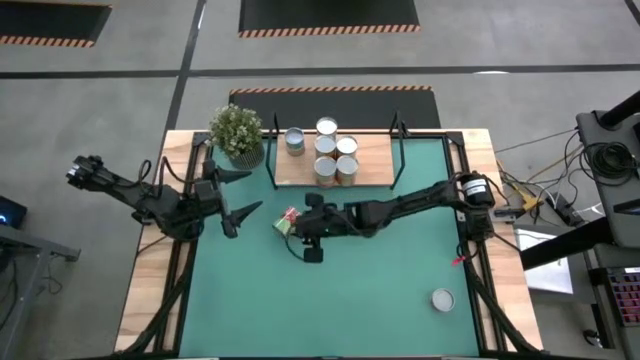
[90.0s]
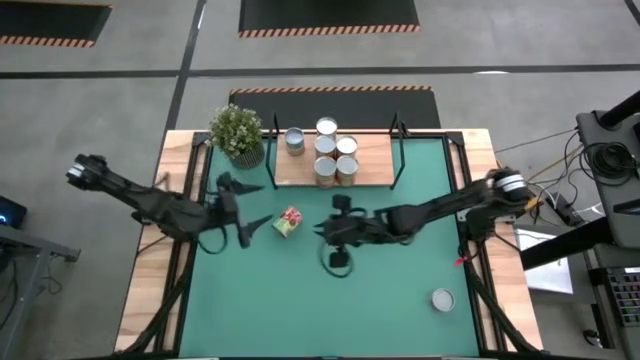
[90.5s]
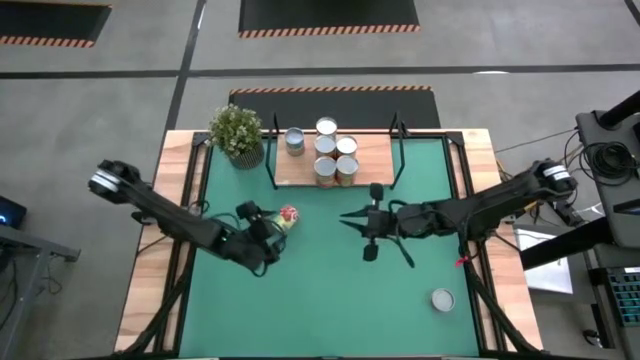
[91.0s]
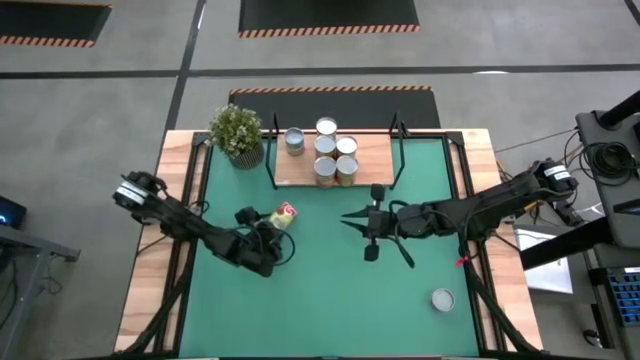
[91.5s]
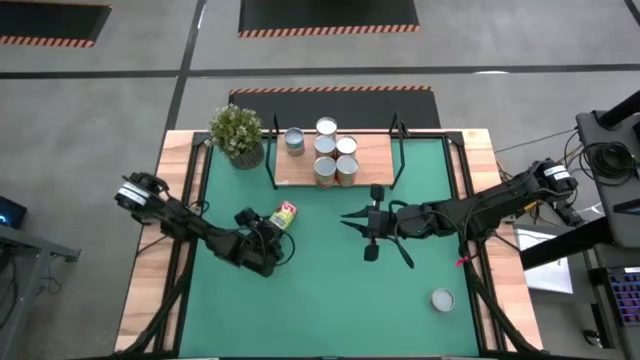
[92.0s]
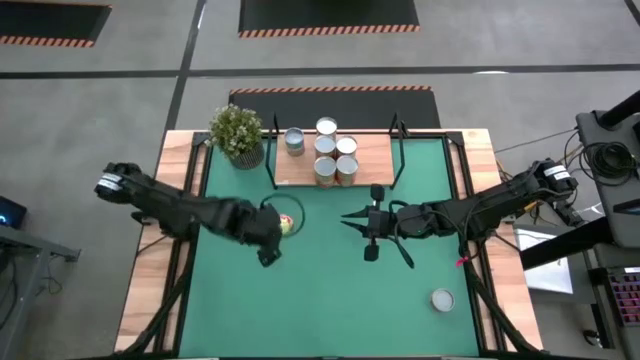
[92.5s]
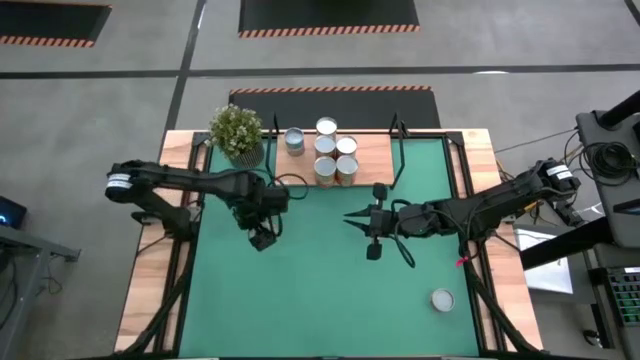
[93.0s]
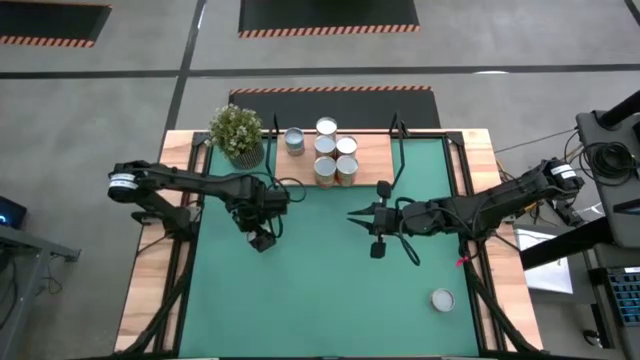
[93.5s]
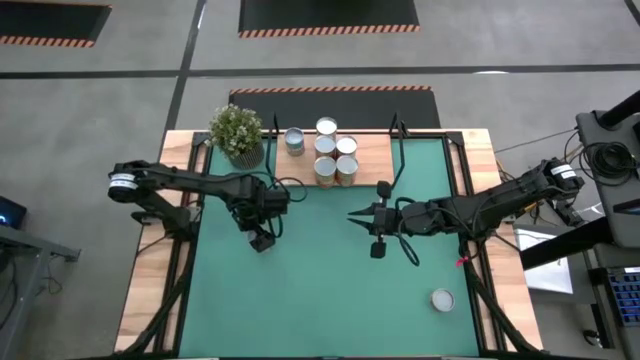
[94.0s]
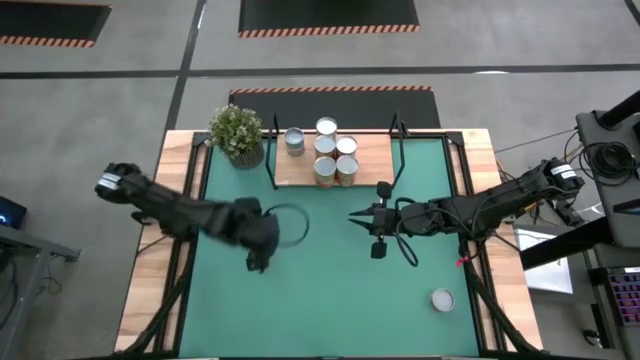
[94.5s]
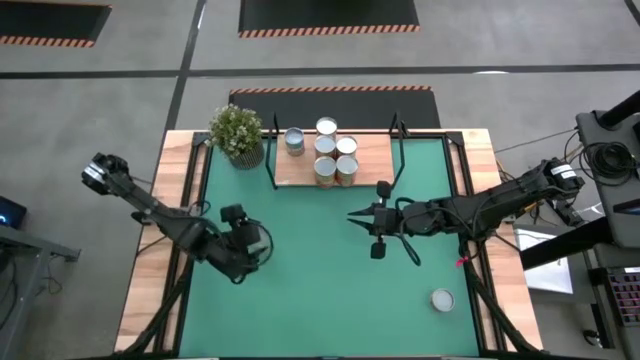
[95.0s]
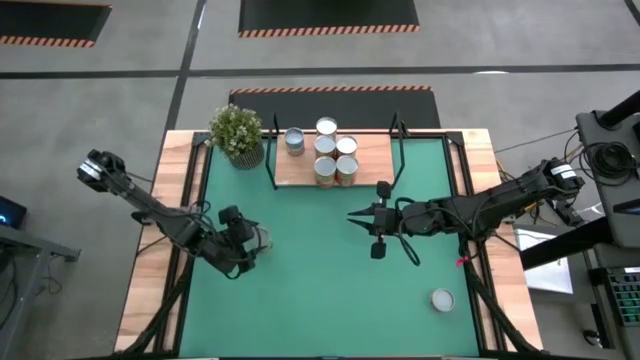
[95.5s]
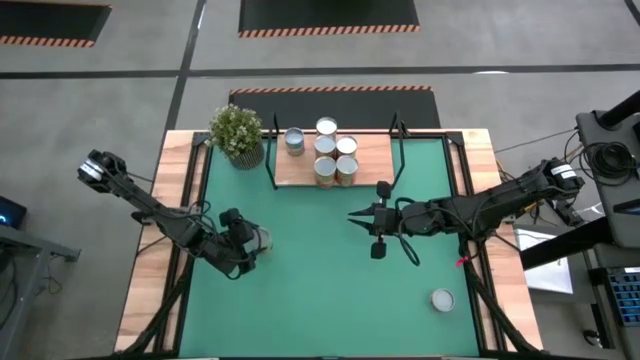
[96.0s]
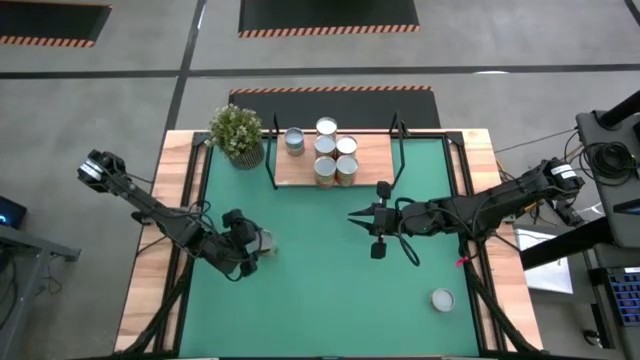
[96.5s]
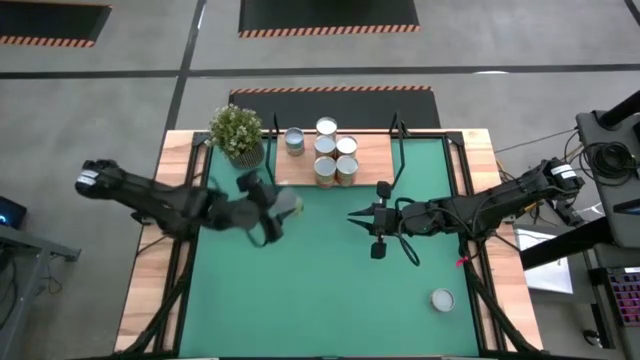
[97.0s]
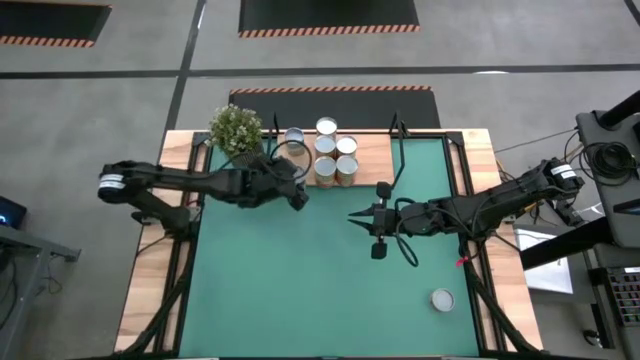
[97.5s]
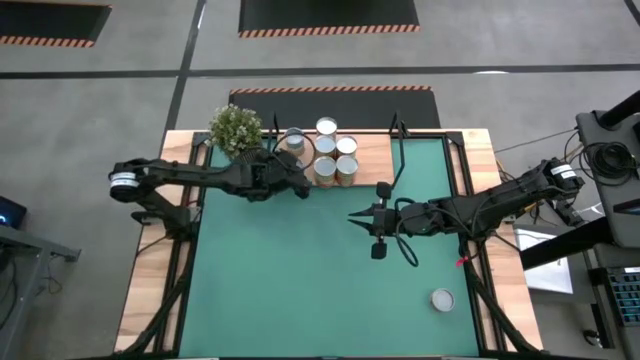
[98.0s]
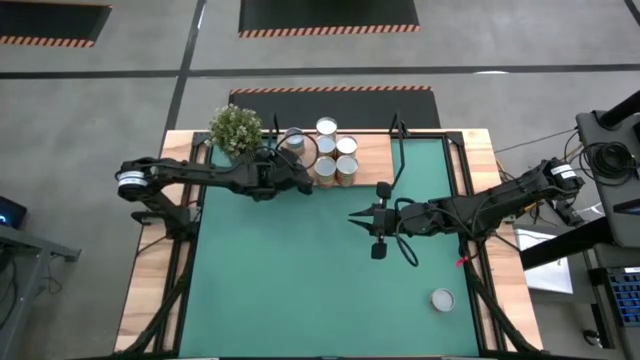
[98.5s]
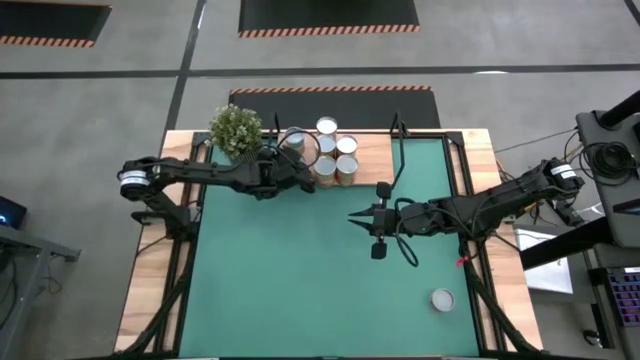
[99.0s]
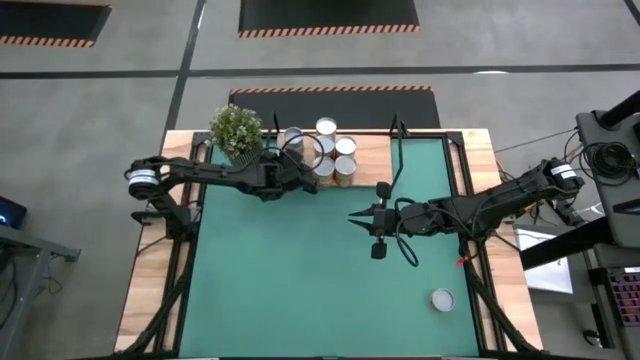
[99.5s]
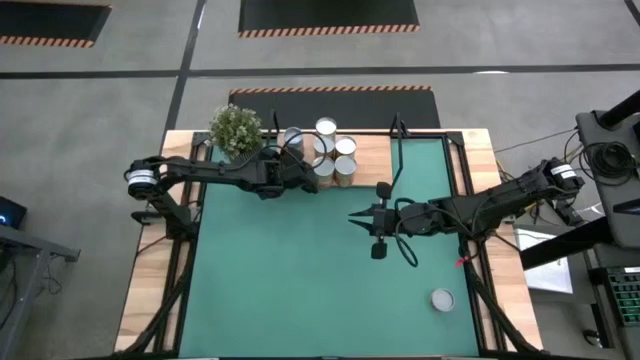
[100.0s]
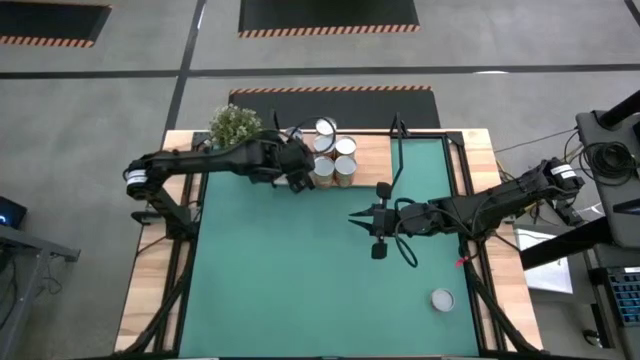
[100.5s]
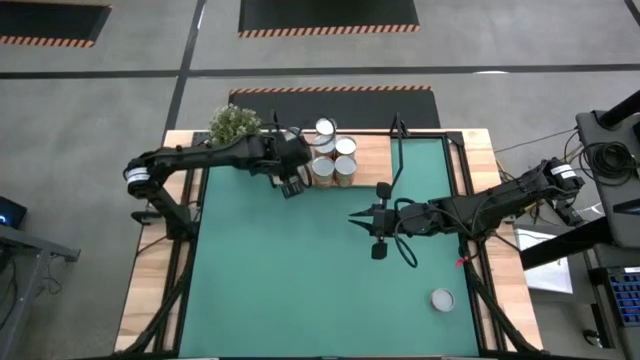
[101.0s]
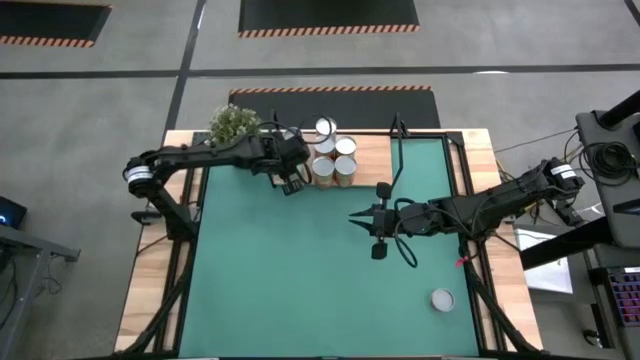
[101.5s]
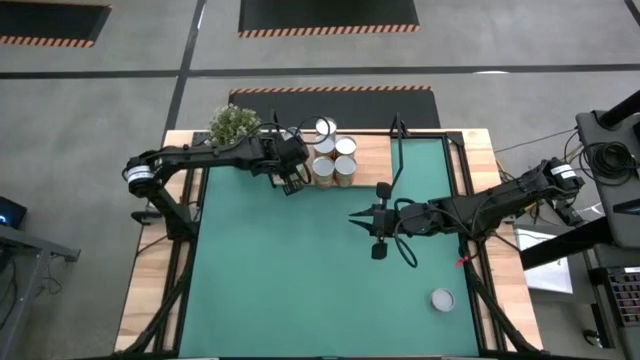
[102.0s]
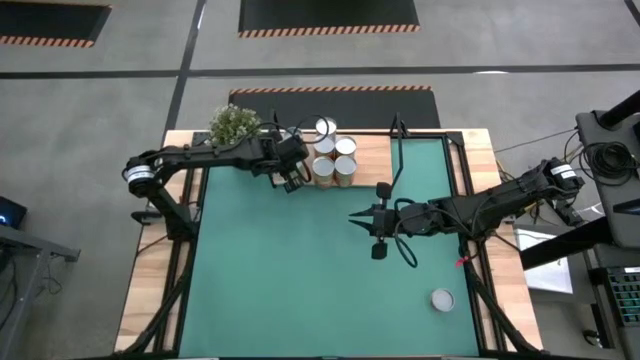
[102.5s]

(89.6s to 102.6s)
Task: Pick and place cans onto a shelf
Put the canned spaghetti sauce on the shelf

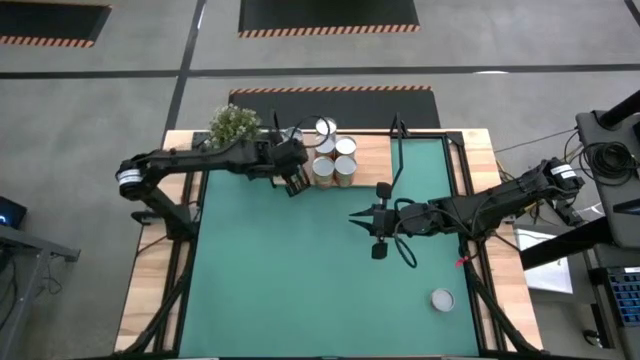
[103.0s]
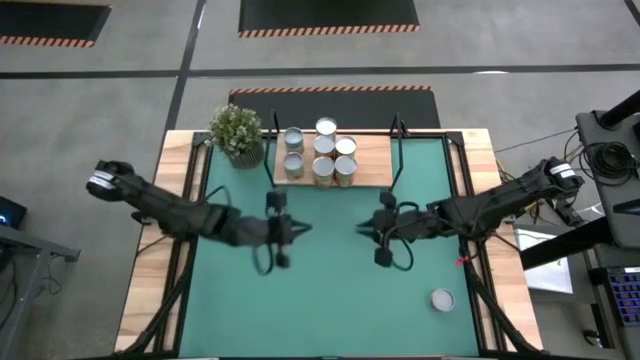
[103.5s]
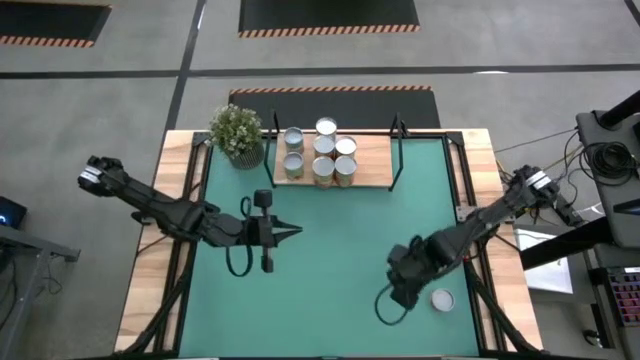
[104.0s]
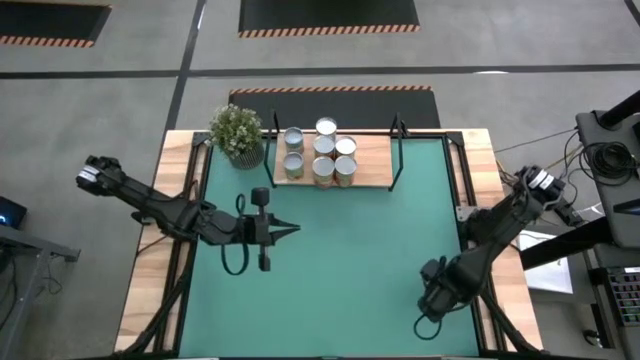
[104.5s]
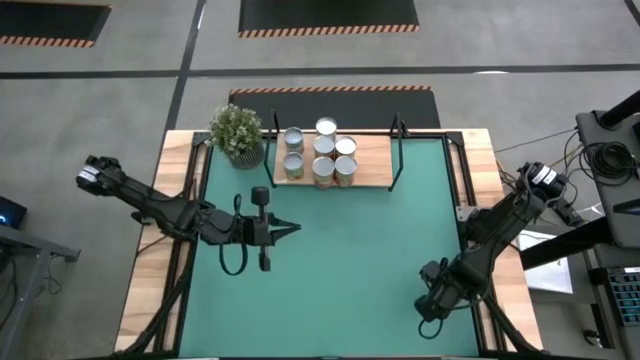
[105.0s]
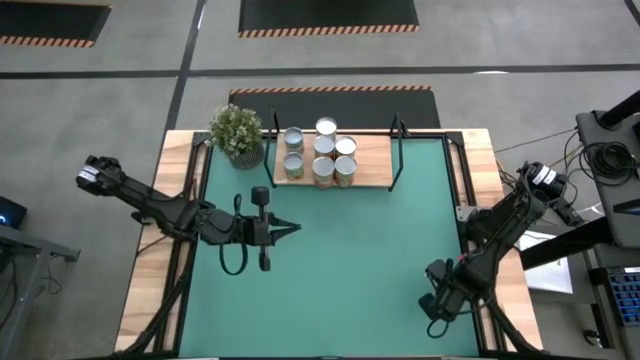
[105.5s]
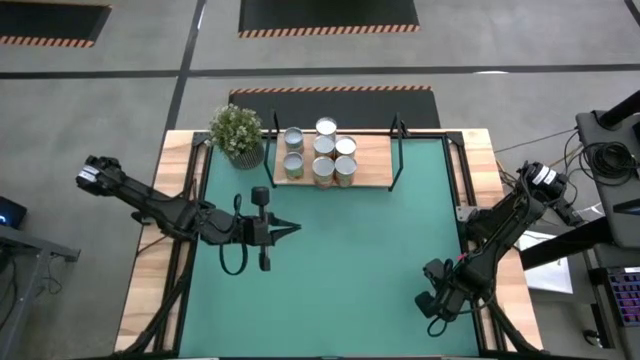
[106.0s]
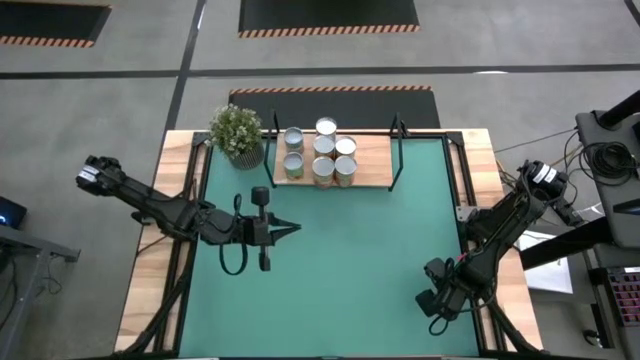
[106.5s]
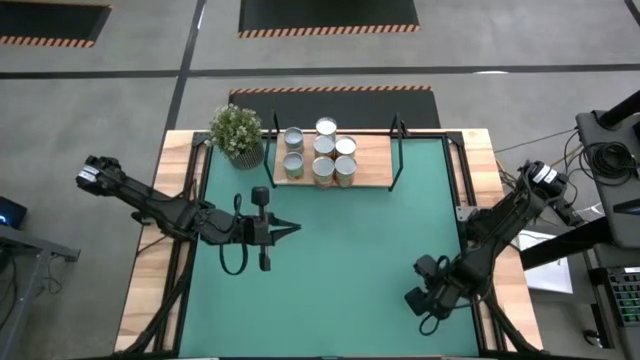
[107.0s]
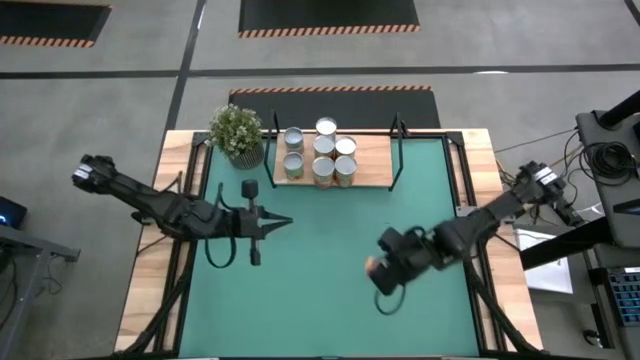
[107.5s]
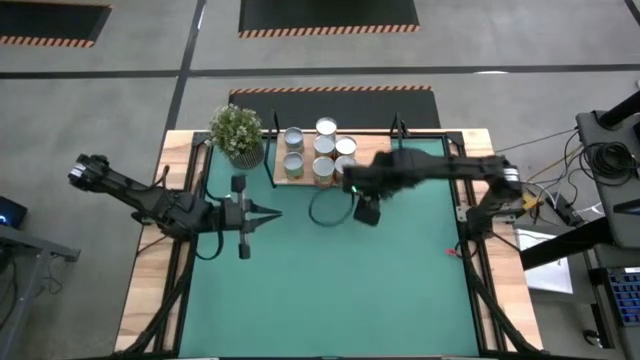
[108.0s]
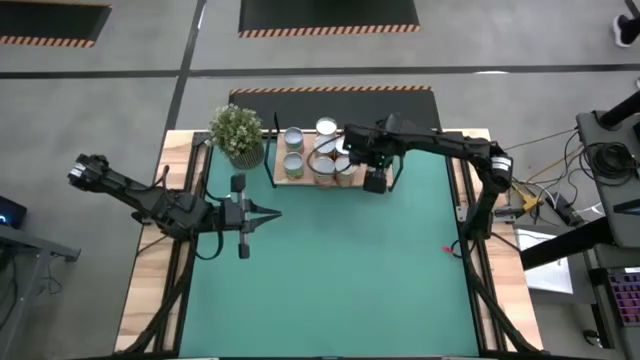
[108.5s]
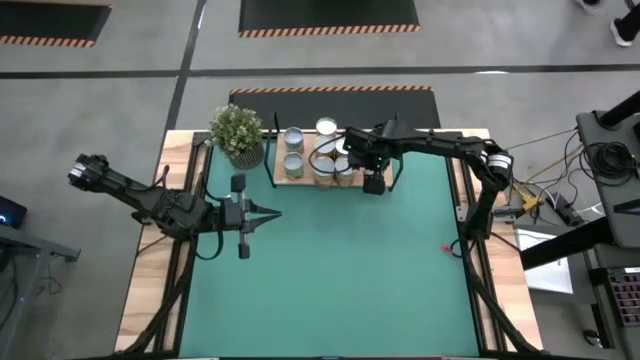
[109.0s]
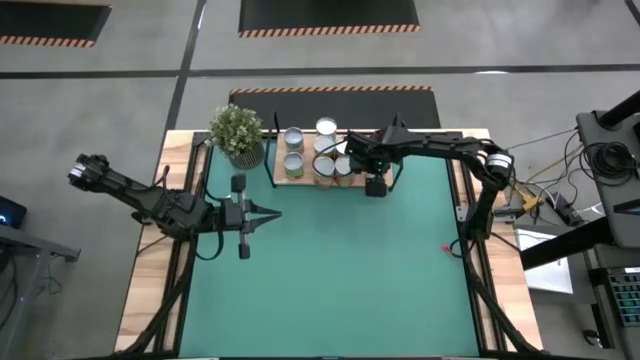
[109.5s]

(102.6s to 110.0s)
Put the canned pineapple rings on the shelf

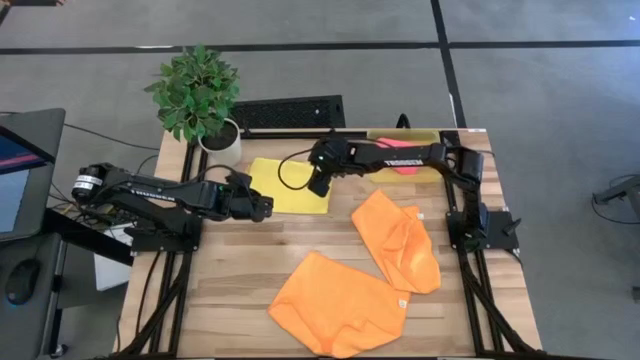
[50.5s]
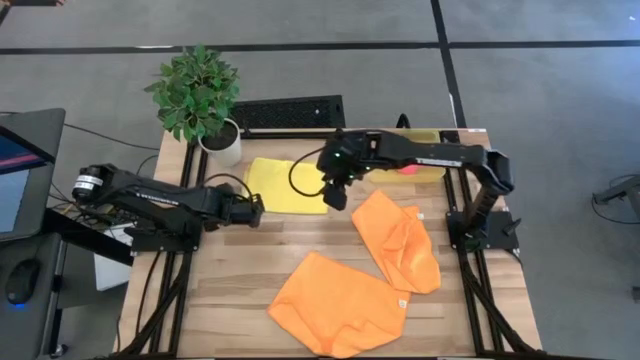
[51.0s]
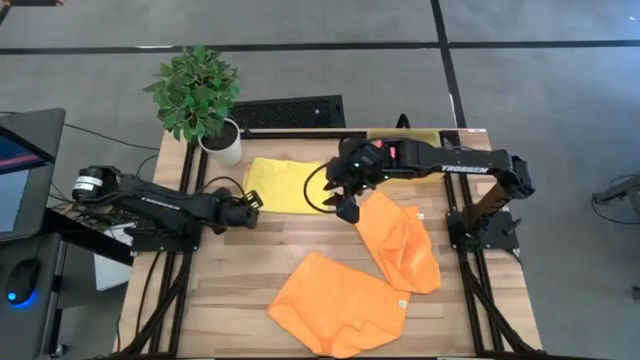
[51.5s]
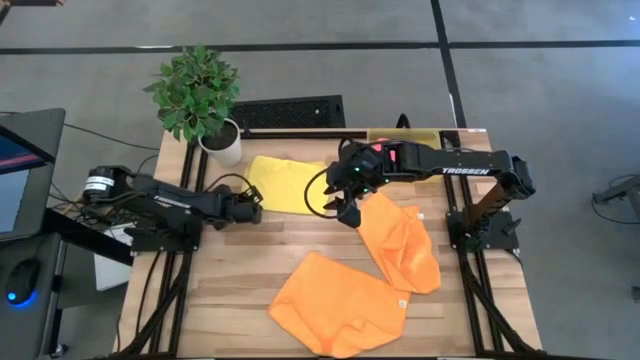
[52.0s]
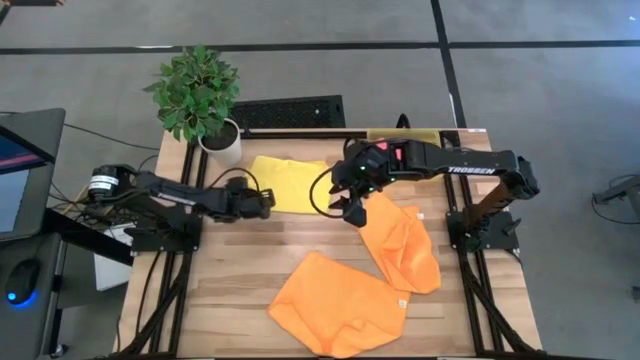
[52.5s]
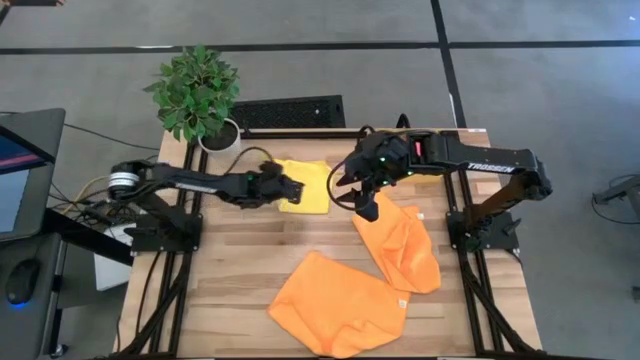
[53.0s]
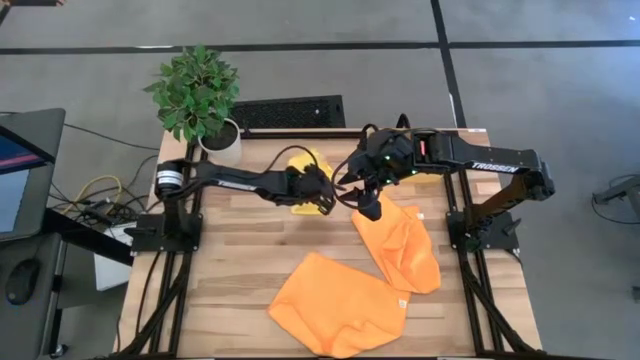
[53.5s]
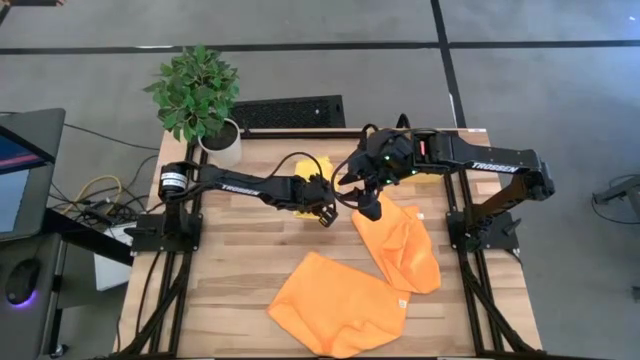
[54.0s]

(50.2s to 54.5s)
Task: Fold microfiber towels
Fold the yellow microfiber towel
